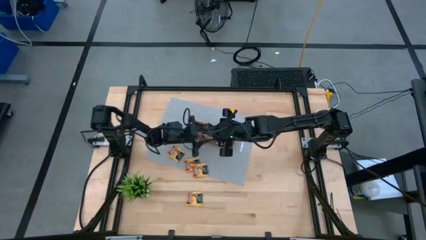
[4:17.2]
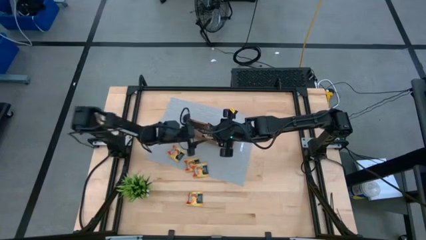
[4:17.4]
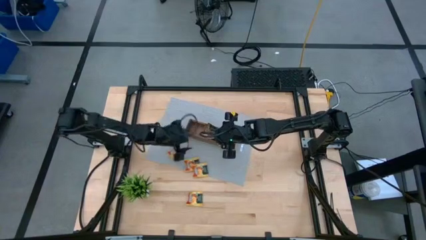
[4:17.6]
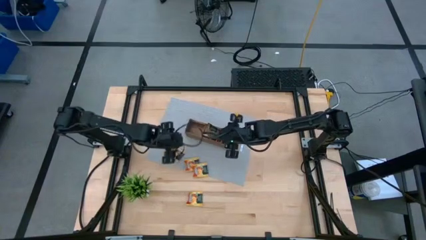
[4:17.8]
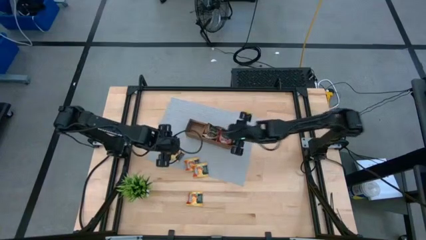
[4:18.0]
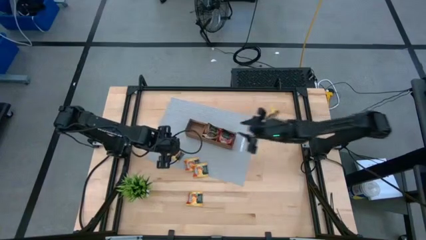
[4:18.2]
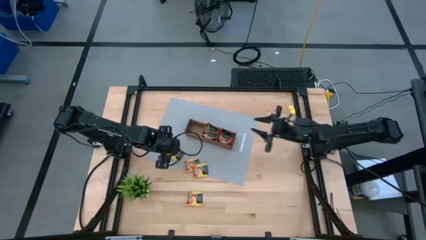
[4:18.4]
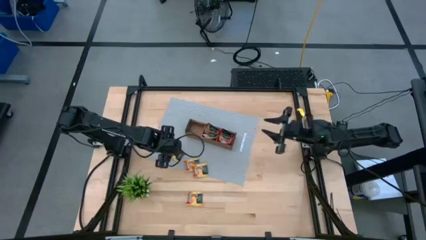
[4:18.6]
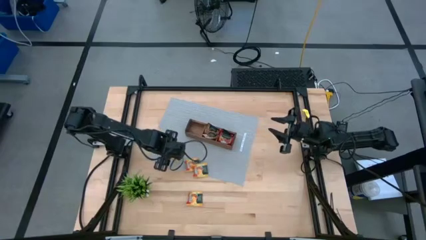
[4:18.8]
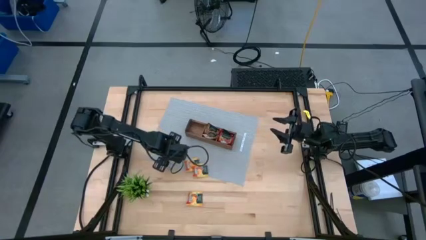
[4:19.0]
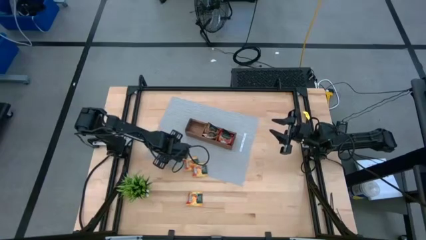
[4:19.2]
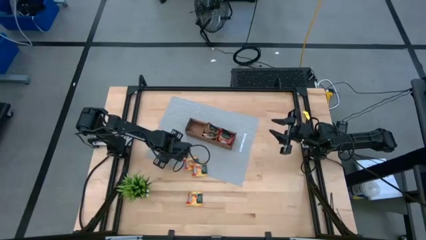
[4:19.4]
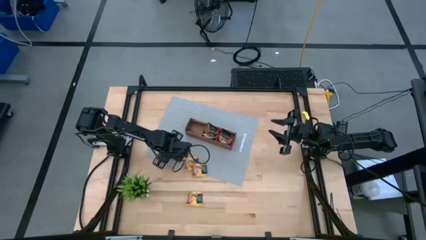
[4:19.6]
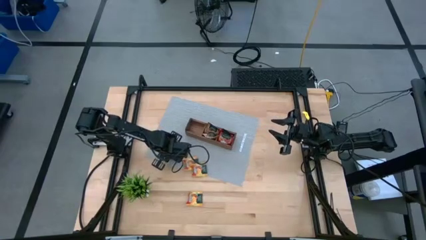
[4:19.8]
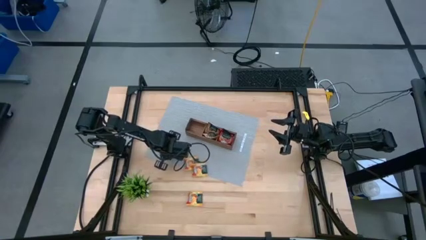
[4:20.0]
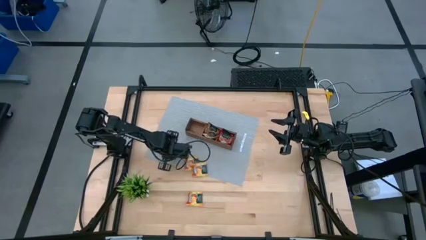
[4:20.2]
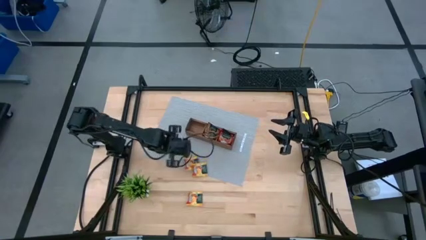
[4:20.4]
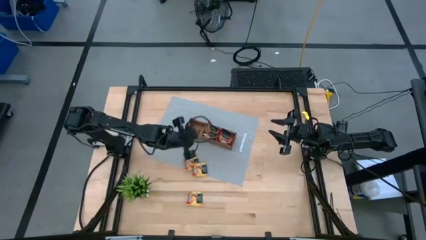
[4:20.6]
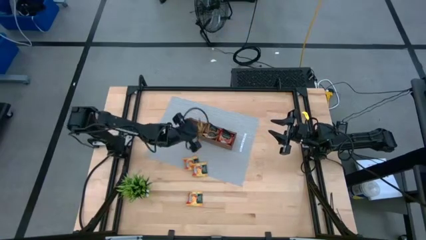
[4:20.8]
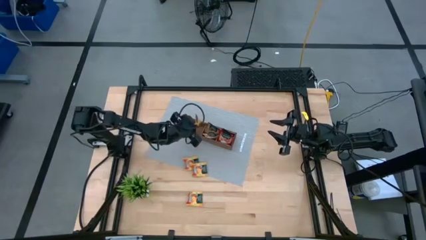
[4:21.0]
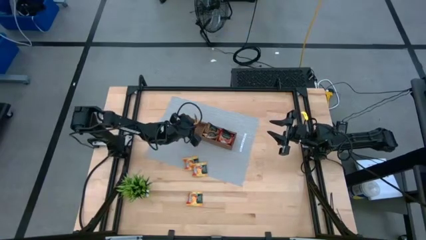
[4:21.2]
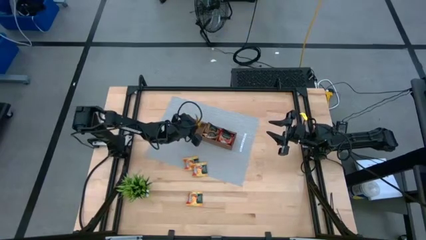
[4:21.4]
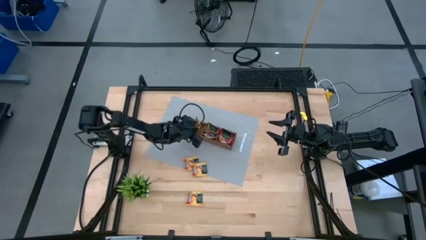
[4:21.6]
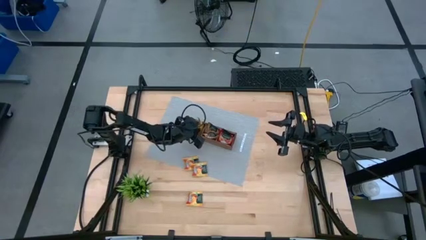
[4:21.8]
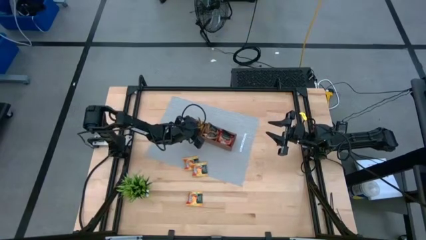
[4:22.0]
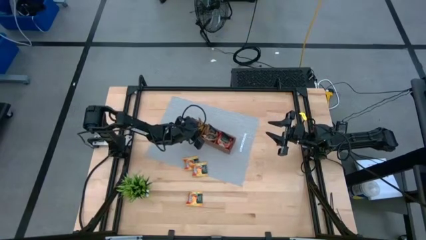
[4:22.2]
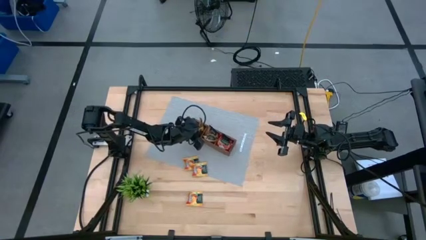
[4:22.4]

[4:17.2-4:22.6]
Task: Pick & Place Tea
Put the yellow tea bag into the wooden organizer

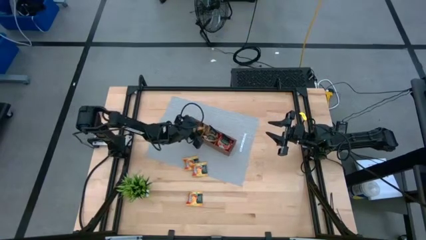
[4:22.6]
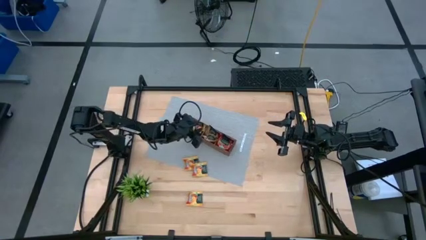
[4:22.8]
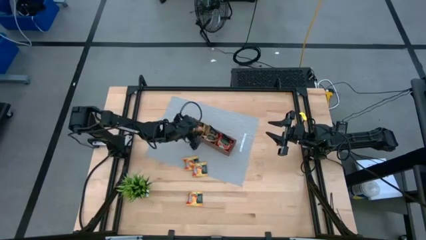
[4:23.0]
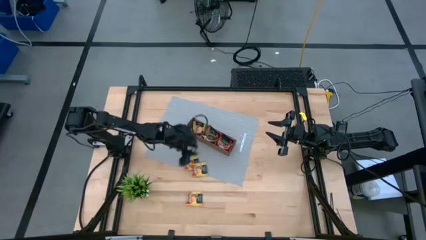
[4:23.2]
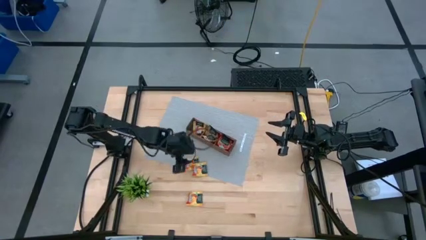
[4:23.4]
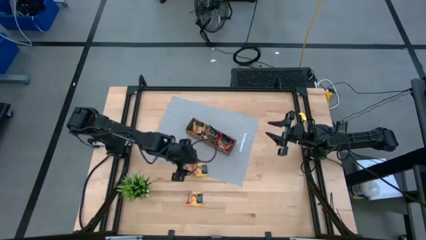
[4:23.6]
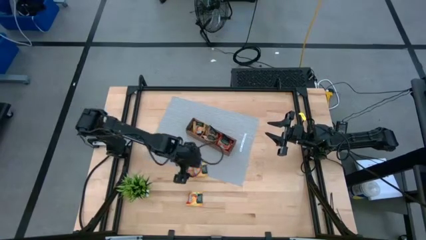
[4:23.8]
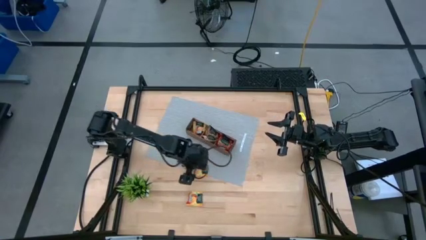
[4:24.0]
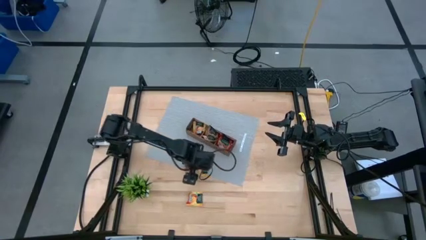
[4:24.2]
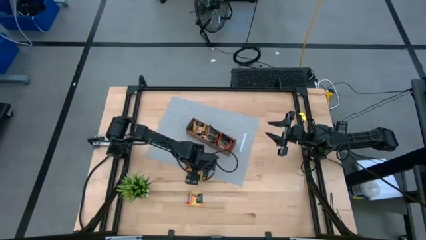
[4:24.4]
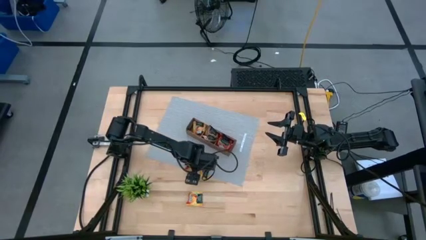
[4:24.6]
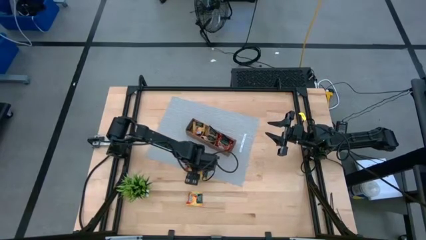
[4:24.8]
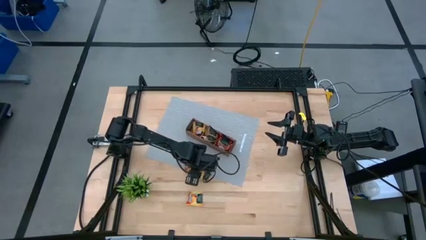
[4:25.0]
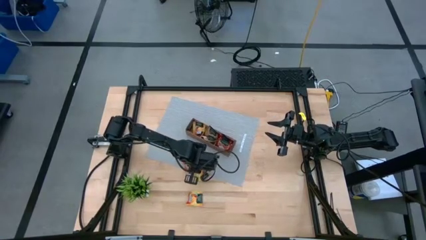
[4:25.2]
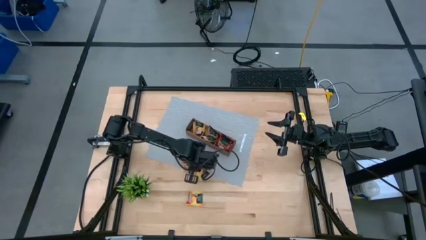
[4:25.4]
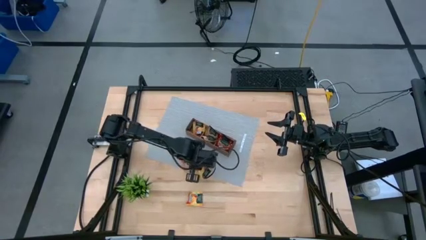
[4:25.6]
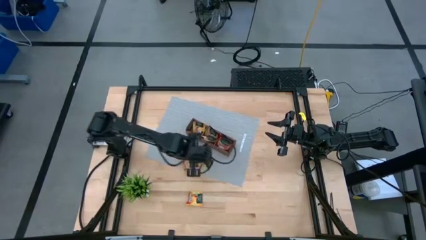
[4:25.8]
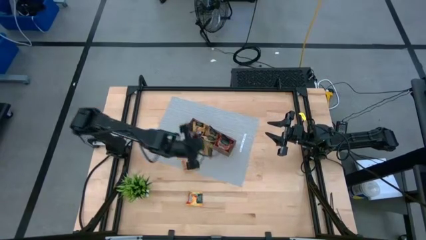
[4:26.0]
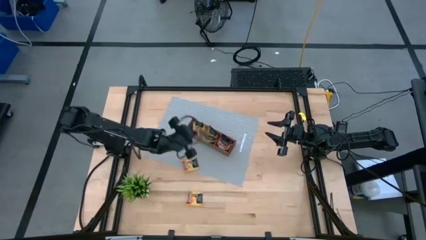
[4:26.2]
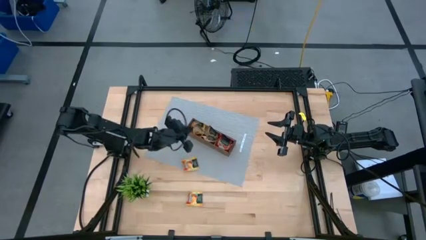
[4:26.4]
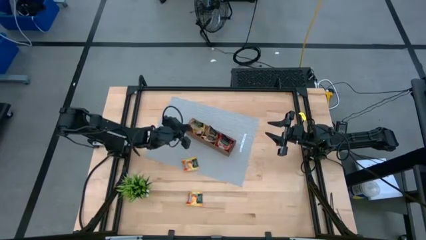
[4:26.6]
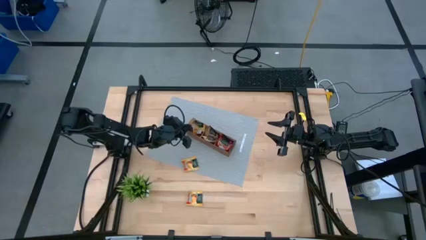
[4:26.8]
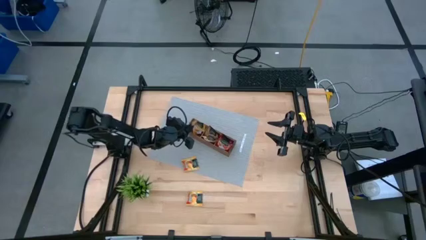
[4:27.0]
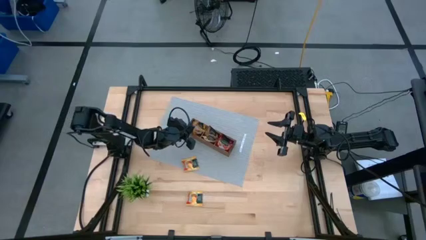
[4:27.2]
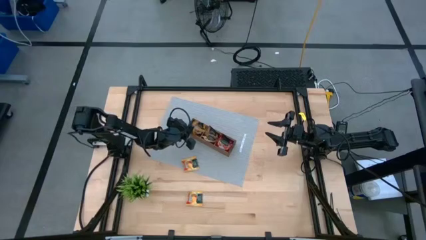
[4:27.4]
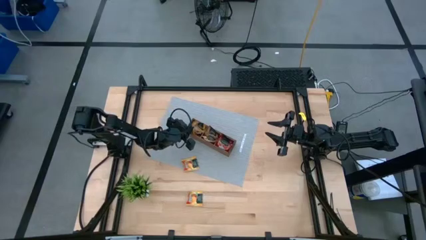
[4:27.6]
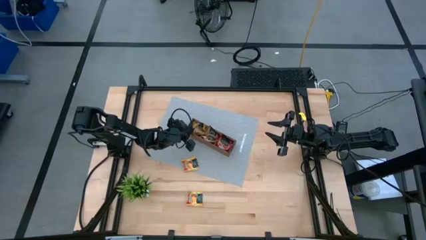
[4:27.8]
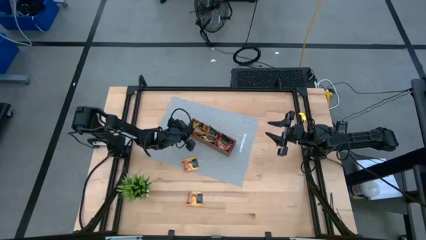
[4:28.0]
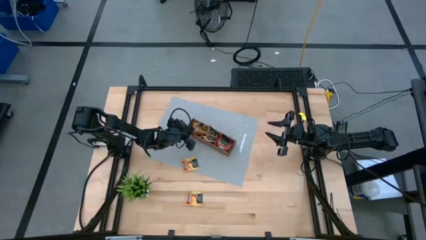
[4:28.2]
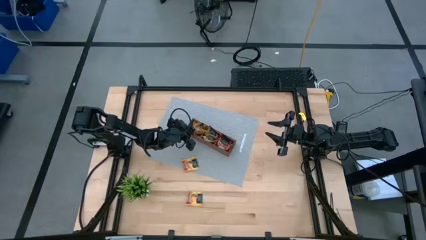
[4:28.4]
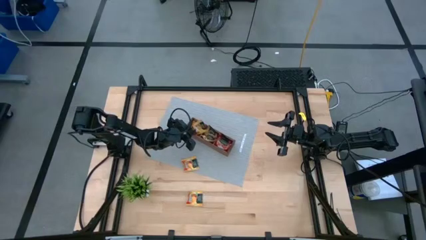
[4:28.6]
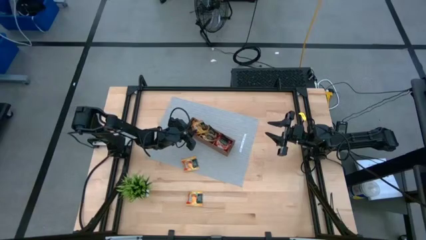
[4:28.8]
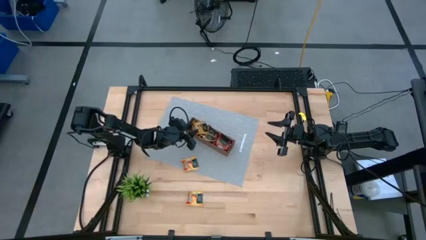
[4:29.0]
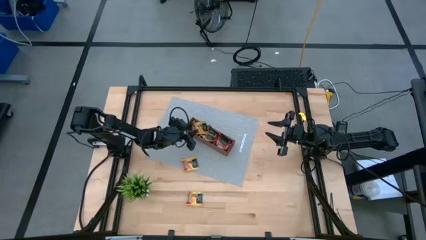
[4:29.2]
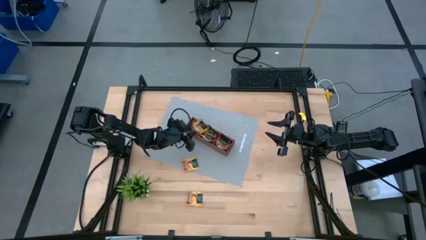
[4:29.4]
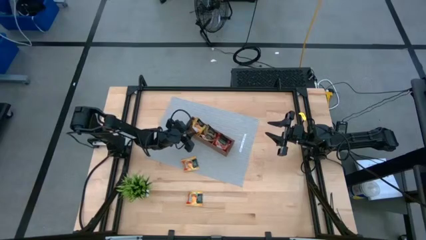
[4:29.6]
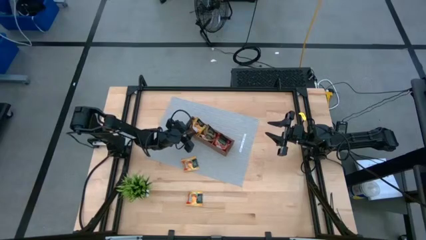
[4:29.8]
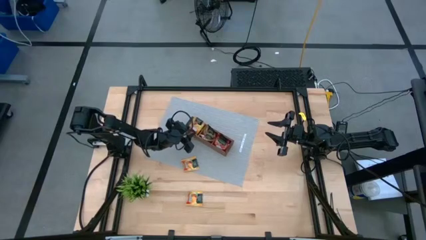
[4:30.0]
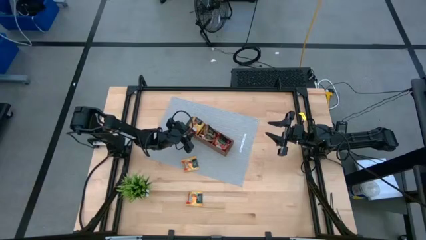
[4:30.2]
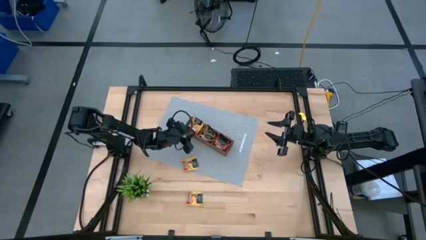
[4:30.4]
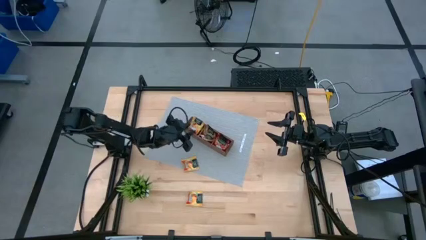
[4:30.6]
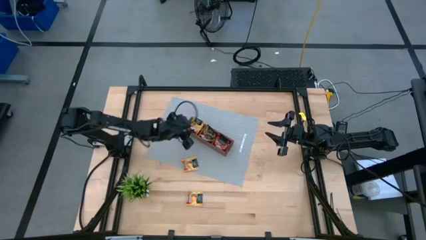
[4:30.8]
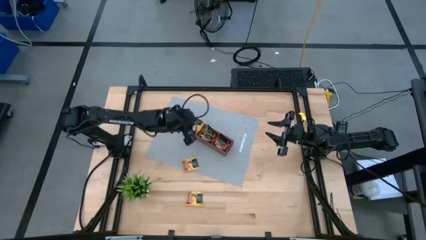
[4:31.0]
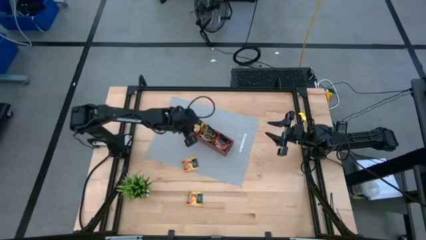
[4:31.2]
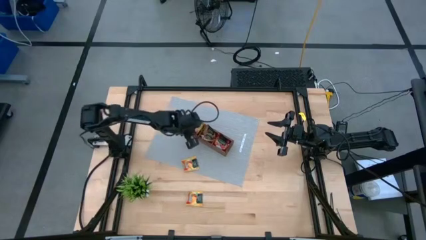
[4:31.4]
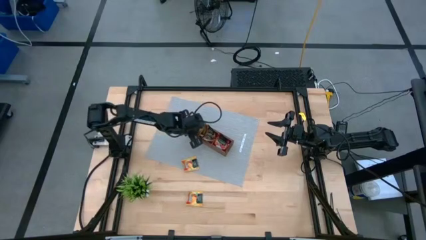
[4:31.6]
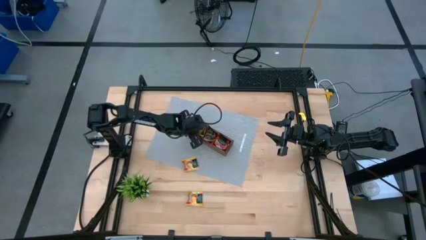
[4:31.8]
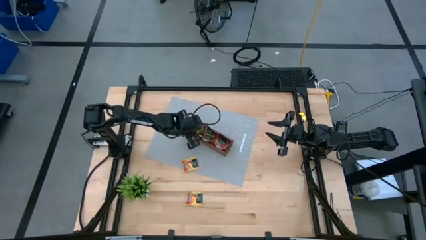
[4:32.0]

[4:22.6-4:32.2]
Put the yellow tea bag into the wooden organizer
